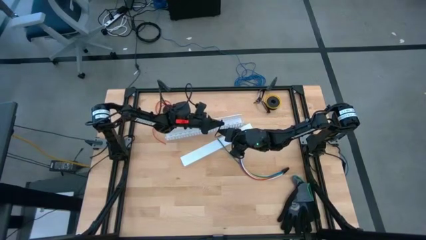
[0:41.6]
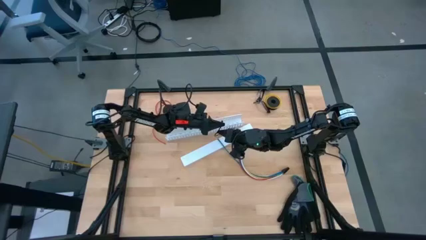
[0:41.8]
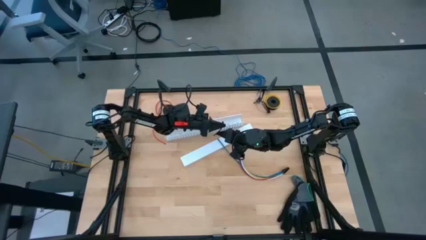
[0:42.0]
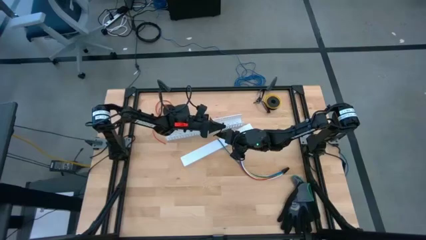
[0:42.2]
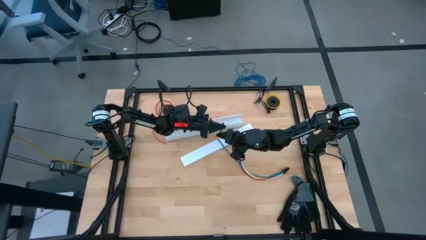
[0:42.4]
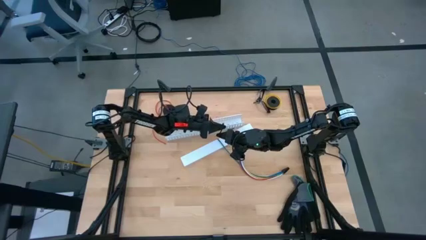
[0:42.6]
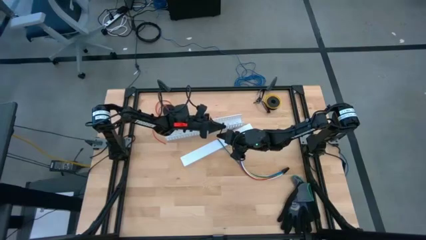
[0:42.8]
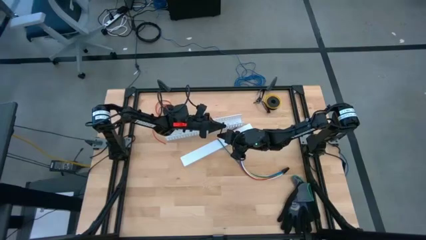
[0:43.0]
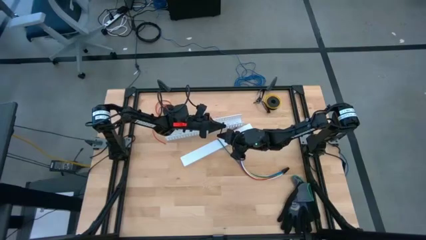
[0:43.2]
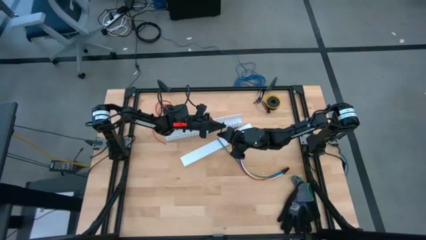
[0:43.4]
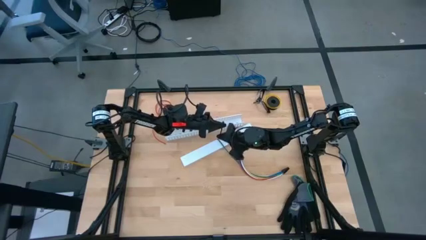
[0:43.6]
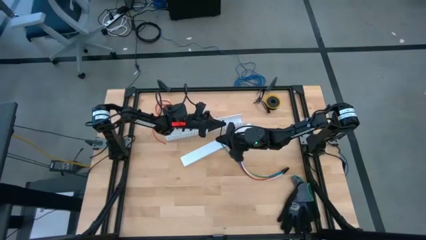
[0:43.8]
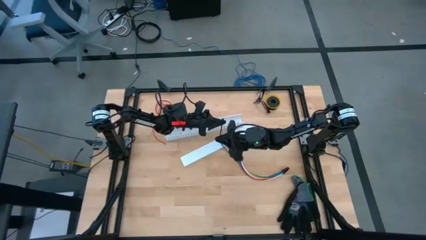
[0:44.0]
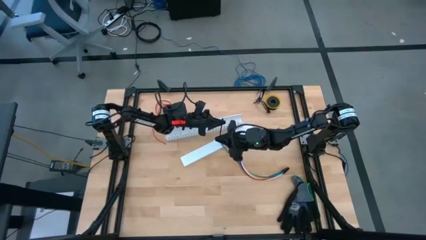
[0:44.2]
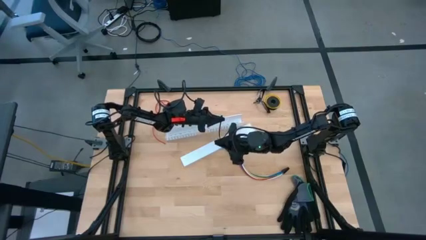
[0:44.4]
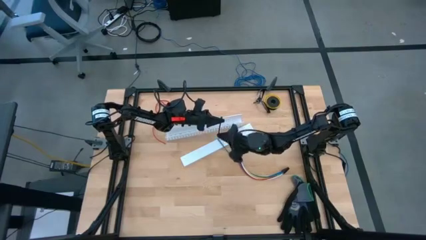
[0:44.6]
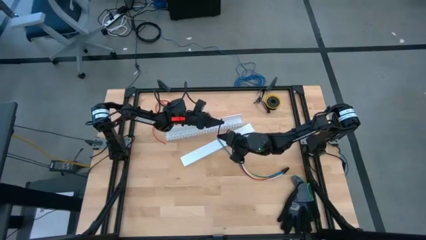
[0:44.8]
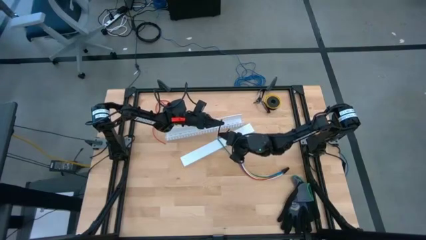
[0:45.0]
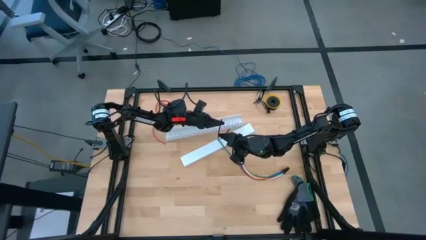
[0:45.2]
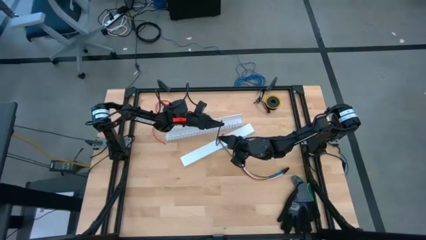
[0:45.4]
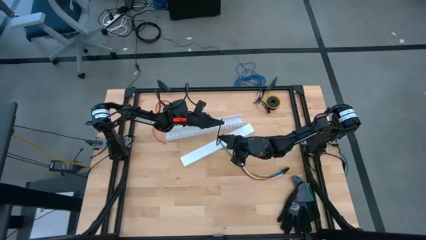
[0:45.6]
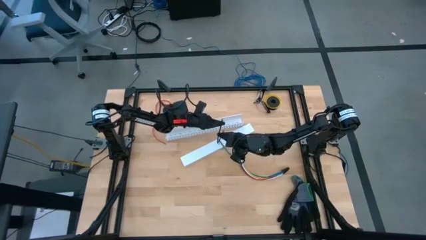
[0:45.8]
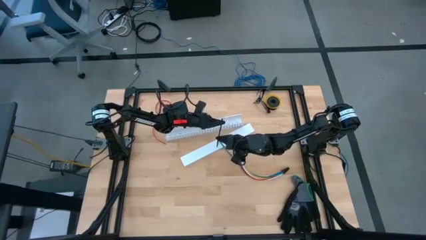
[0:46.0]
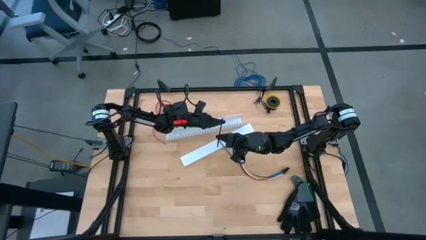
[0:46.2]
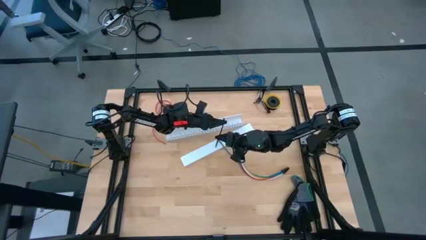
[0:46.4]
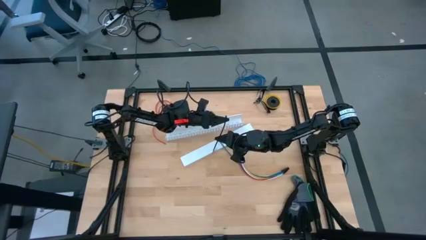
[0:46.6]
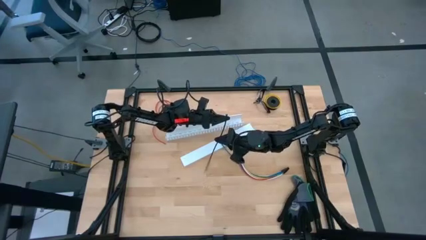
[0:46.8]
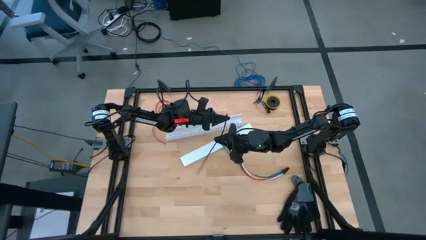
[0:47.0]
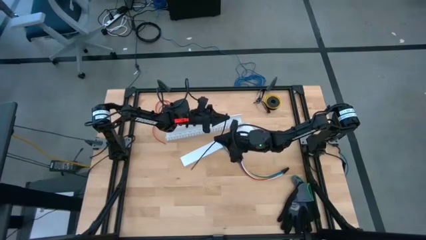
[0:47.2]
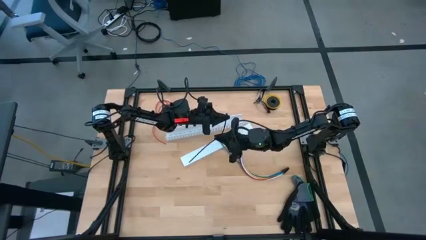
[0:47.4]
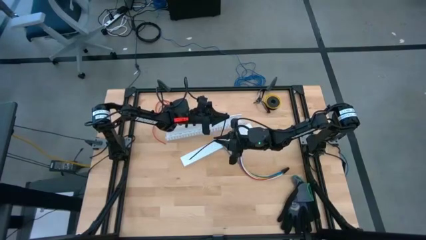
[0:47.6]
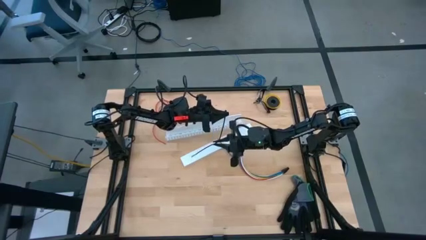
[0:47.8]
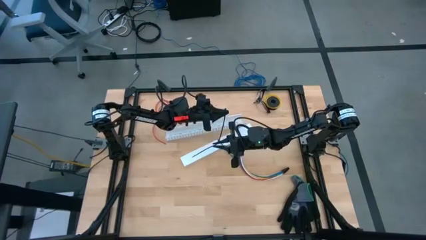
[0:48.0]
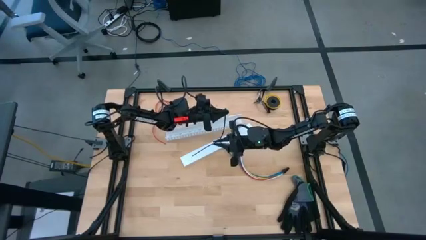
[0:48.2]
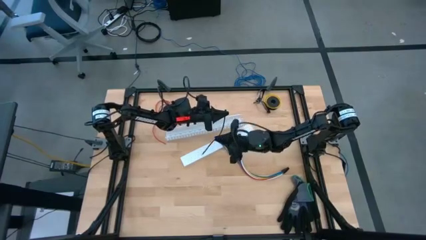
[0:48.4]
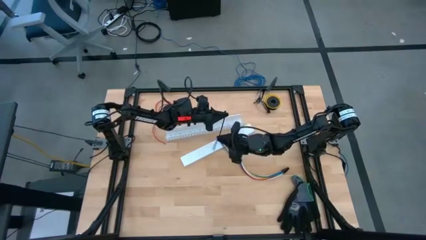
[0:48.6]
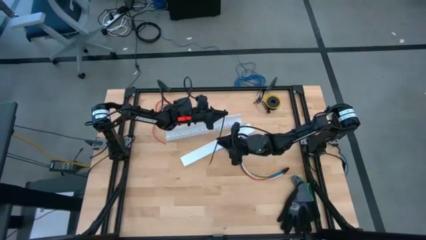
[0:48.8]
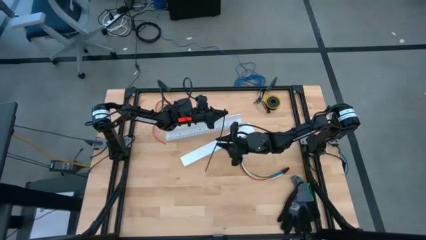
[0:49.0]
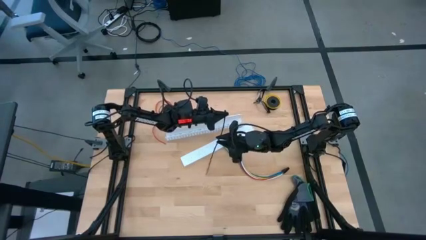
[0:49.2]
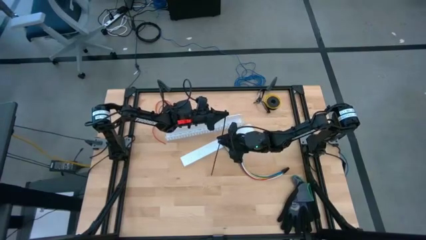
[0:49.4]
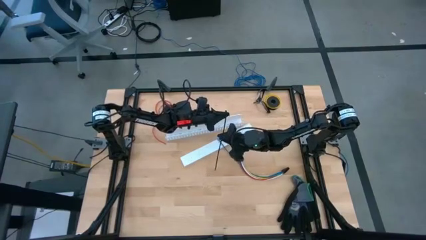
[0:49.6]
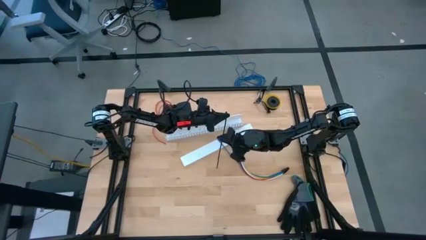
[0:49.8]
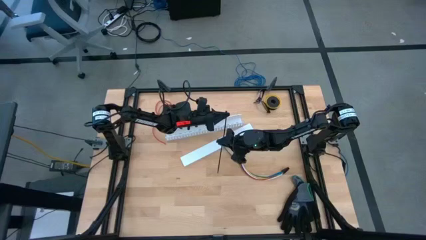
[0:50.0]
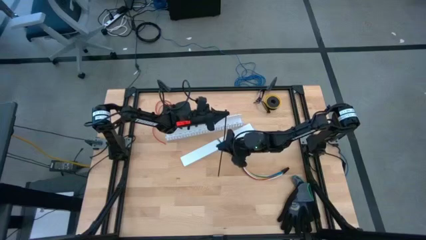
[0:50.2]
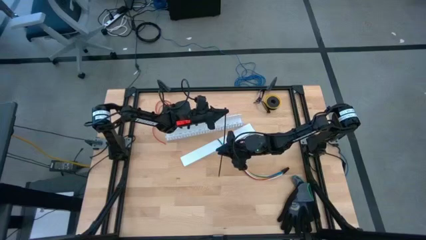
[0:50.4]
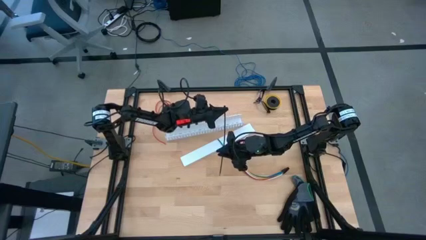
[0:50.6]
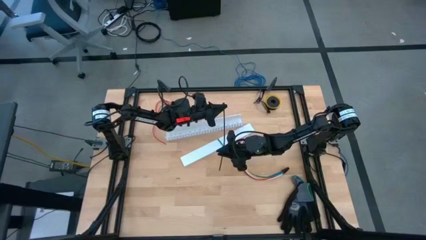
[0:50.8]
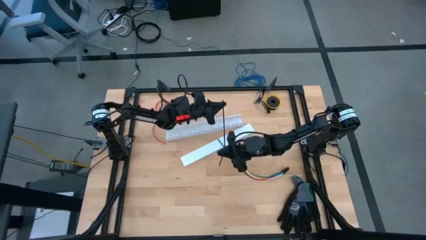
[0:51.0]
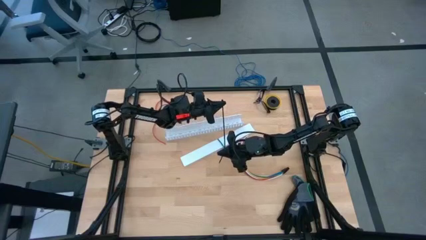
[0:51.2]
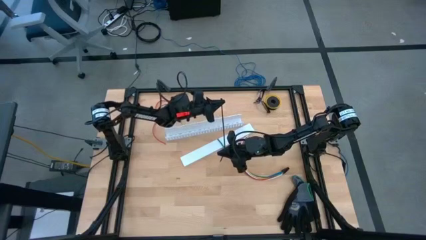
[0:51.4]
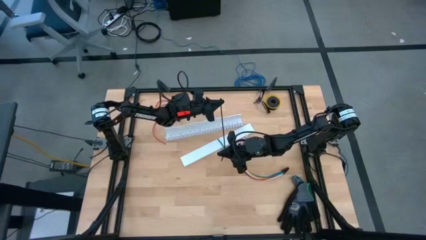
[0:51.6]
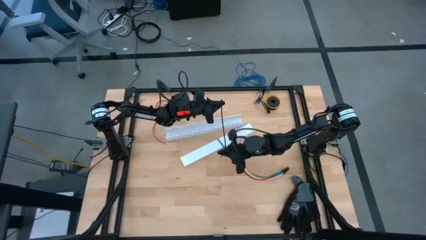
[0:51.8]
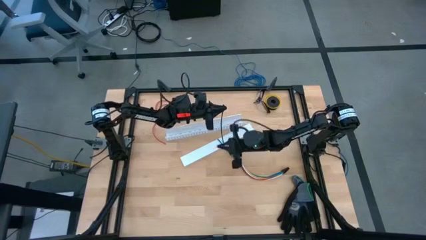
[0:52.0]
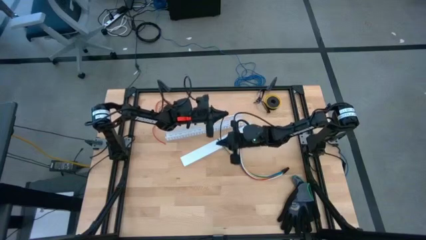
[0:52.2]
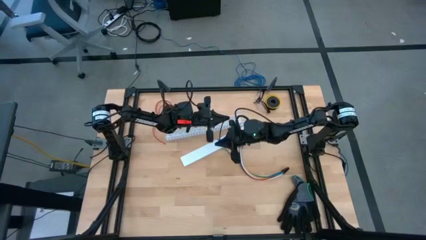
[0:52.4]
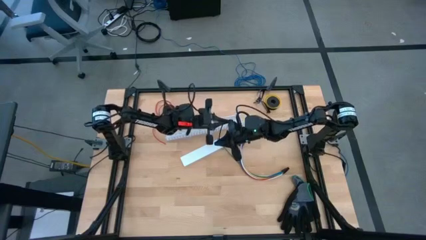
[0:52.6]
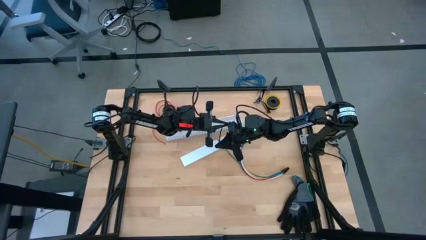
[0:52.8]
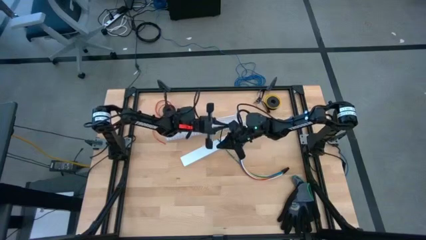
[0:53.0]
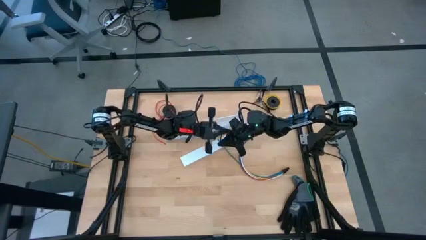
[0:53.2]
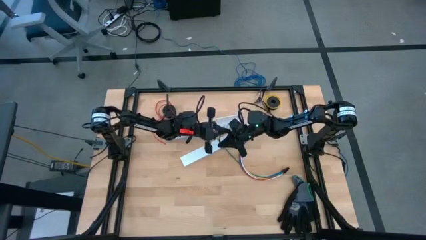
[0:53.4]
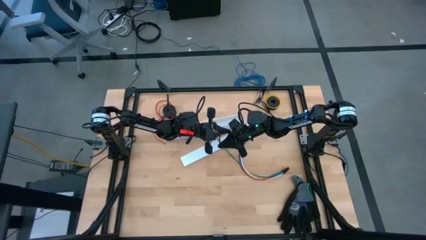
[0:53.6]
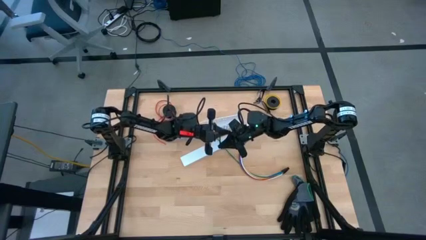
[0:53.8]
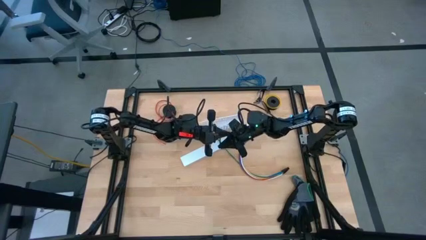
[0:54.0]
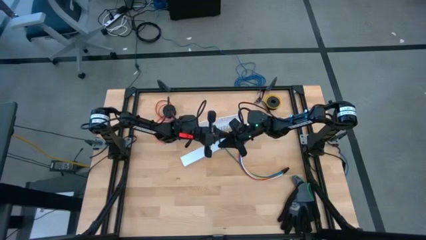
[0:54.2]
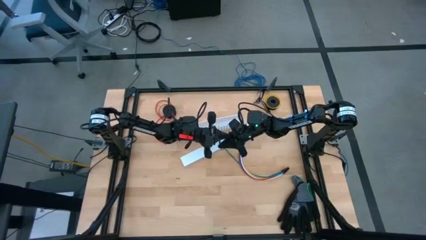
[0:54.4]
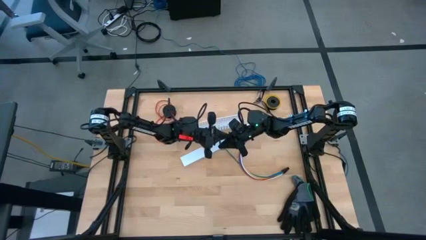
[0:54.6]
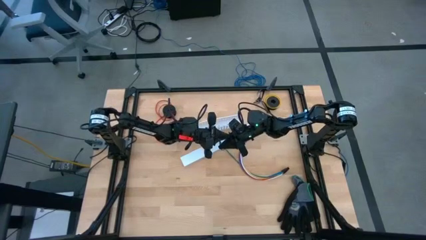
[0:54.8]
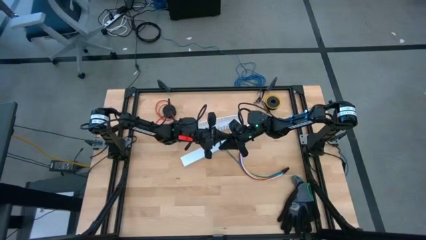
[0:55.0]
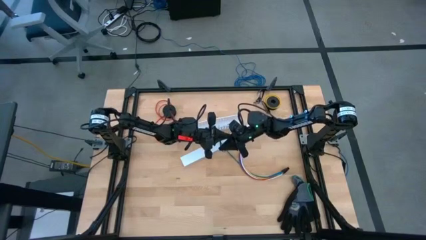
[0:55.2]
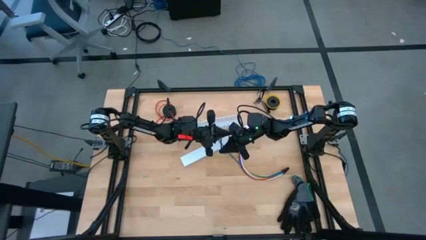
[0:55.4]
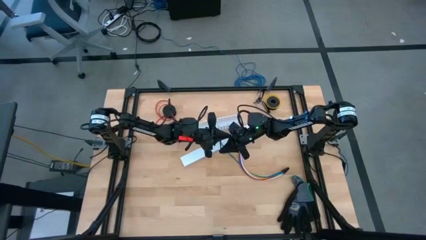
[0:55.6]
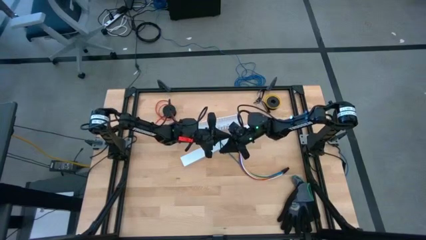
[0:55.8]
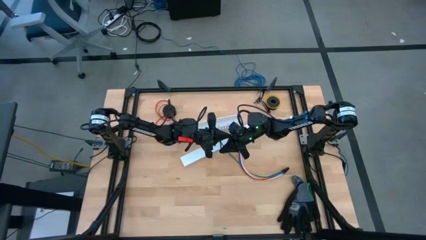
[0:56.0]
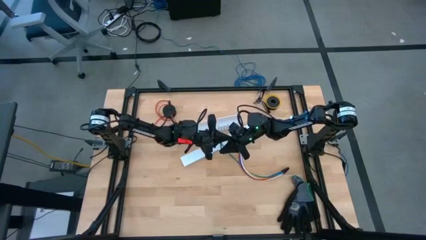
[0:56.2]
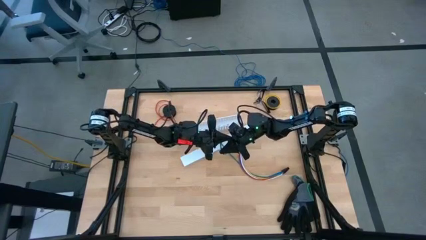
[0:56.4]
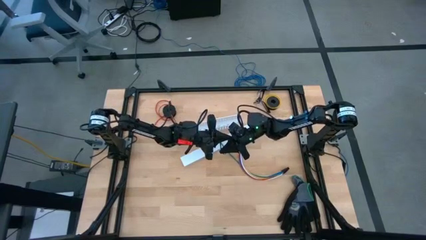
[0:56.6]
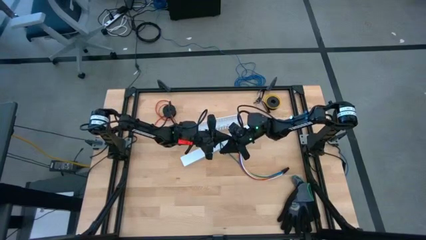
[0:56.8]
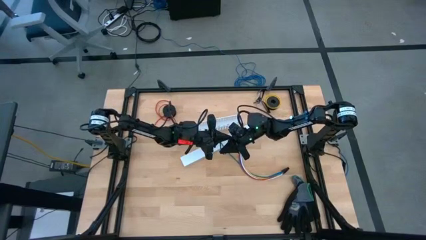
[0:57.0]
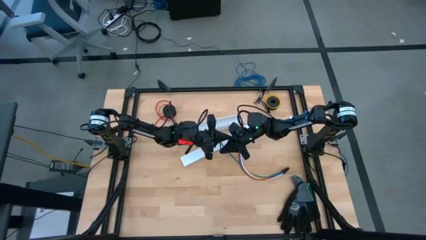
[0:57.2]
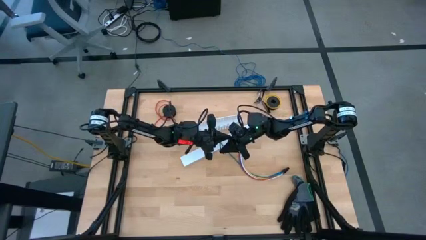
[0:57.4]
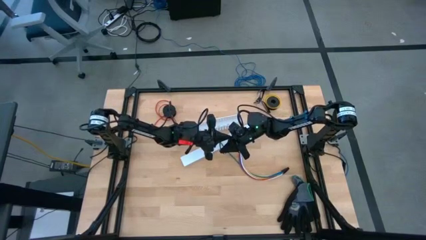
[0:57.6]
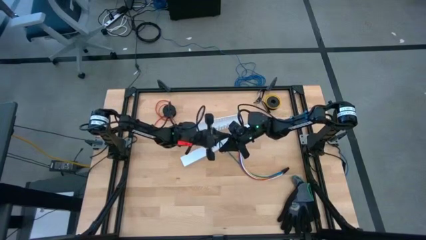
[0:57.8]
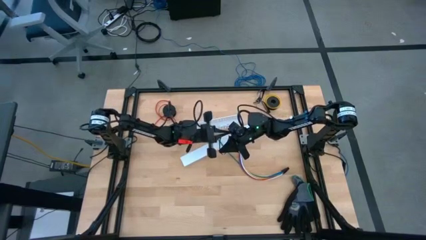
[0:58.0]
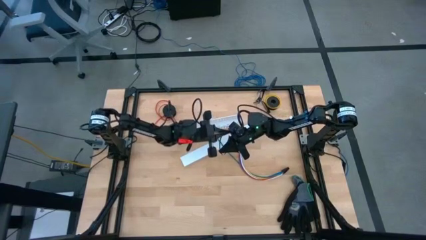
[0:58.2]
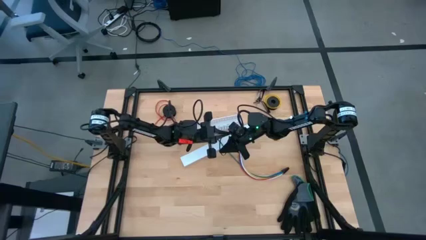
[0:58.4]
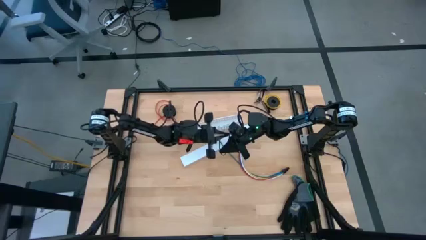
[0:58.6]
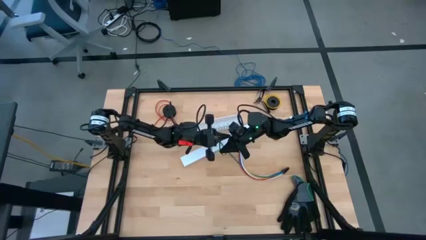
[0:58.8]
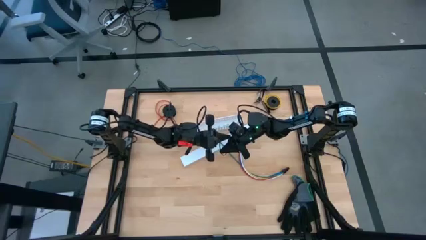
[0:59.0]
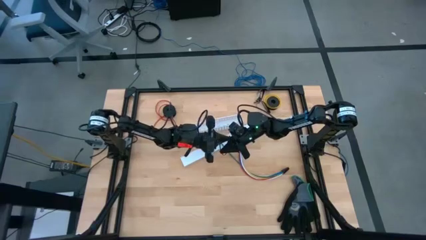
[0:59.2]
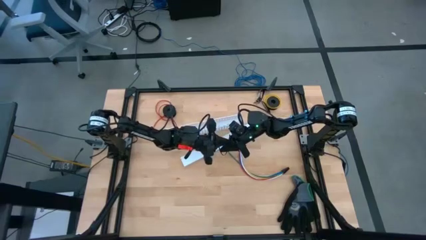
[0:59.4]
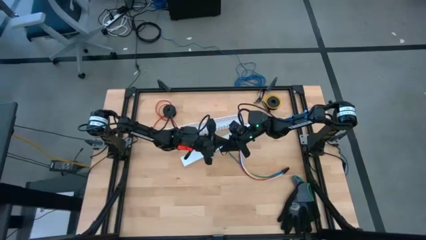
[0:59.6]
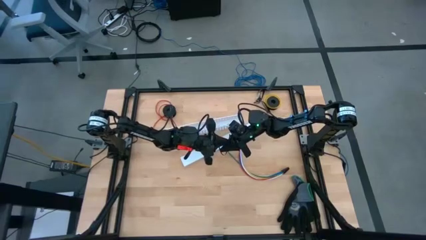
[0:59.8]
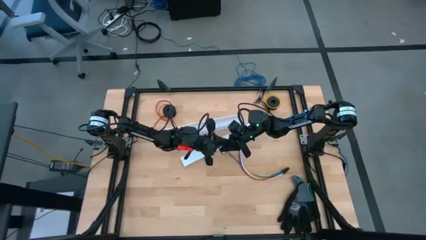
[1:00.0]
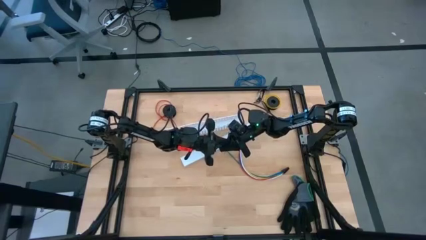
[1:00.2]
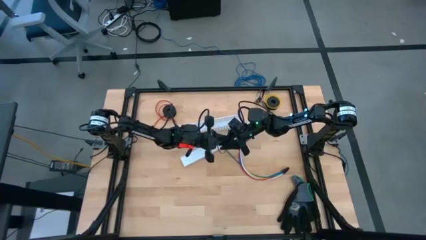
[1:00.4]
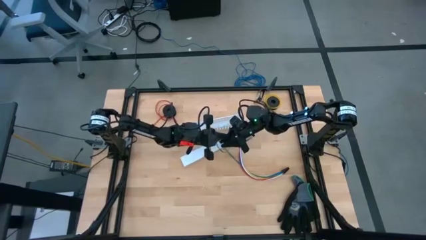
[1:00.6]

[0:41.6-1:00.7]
Task: Ziptie cables
Prepare the black zip tie
